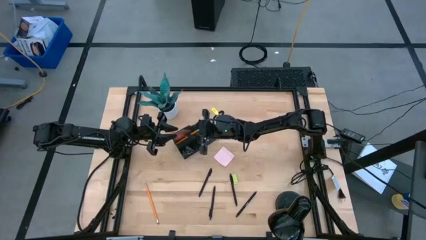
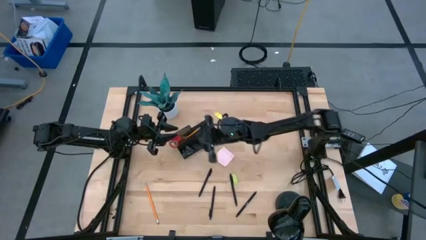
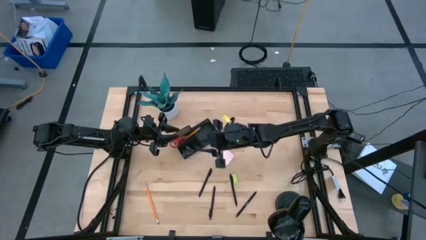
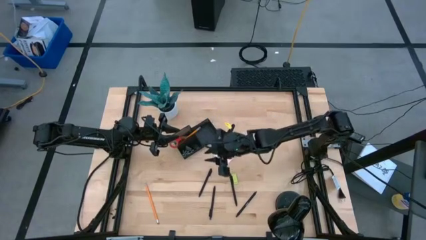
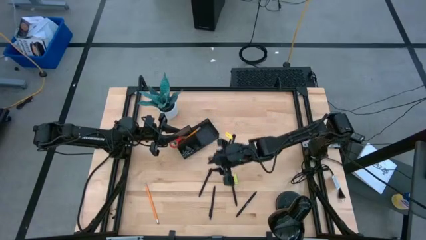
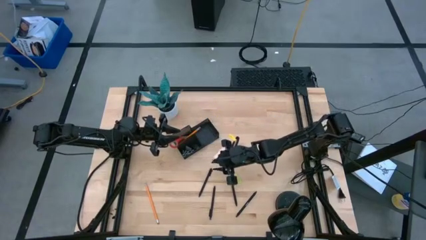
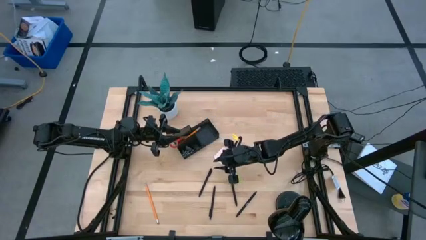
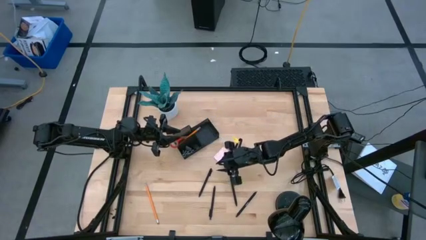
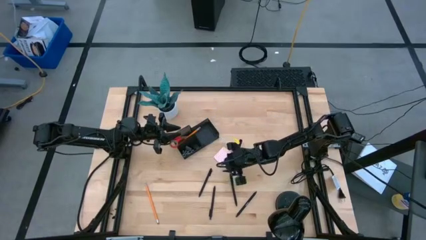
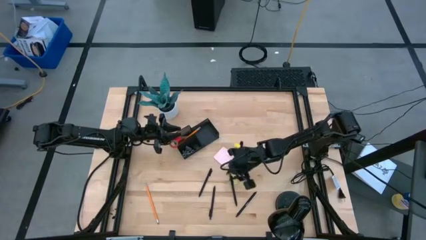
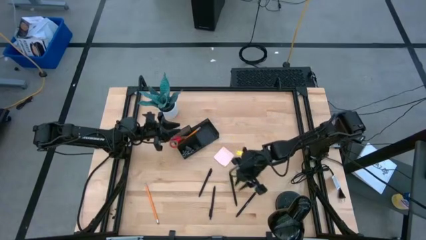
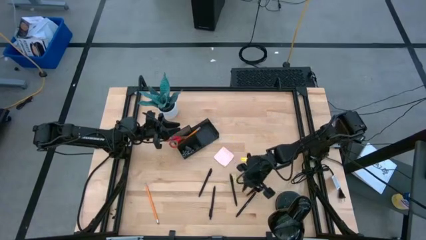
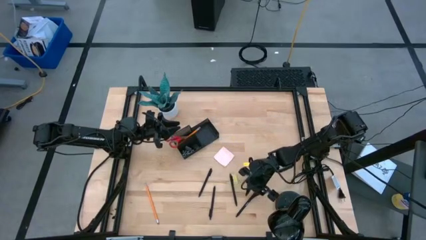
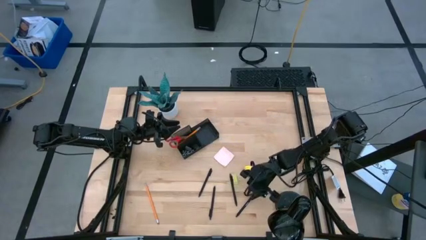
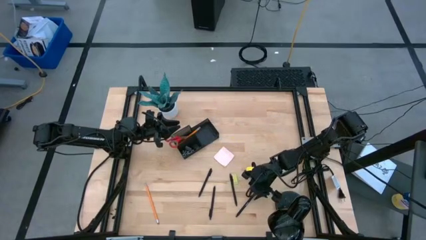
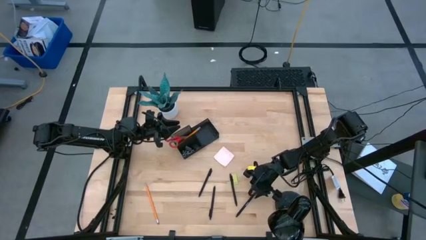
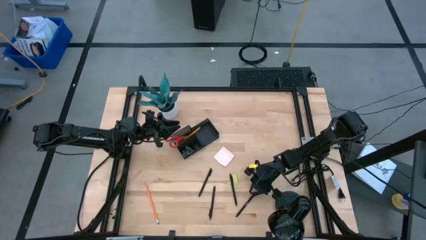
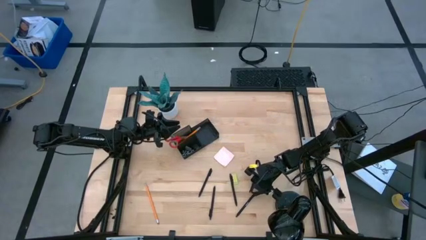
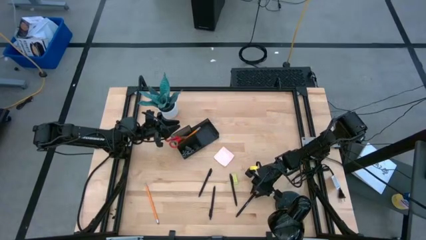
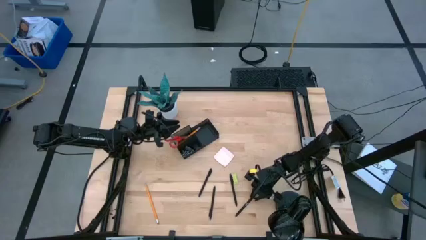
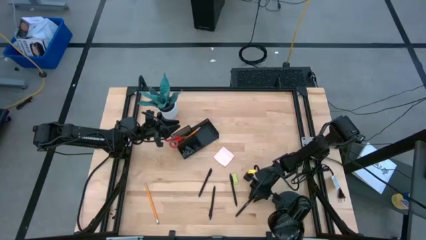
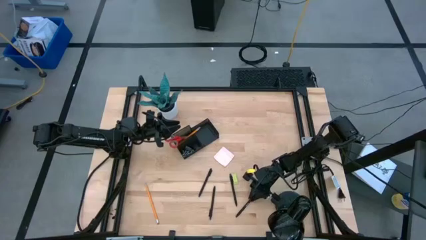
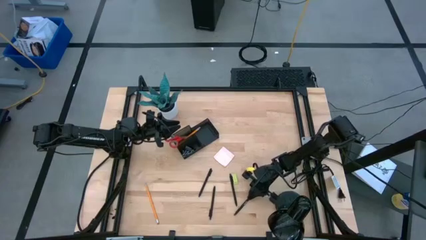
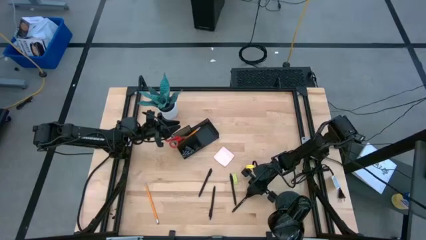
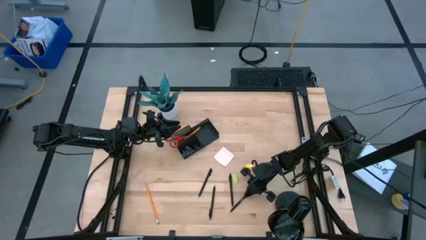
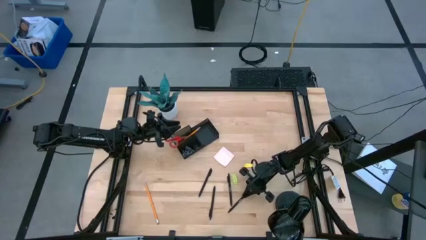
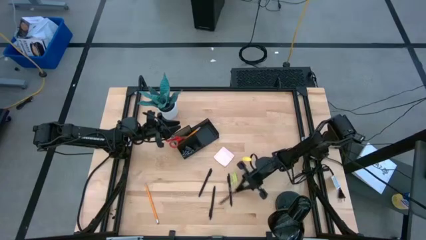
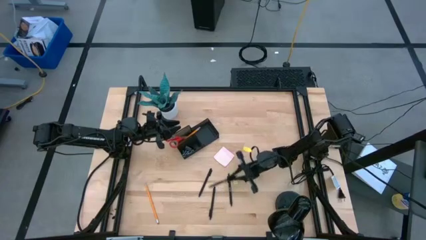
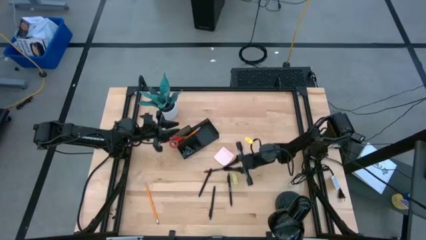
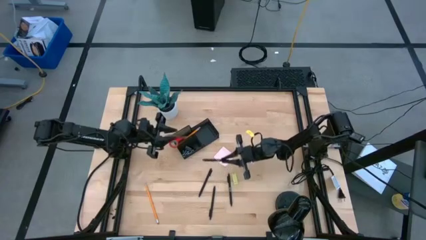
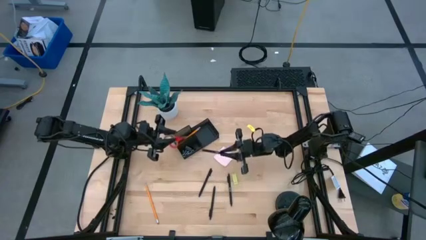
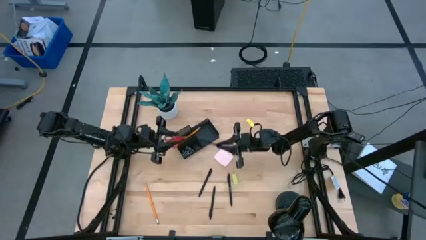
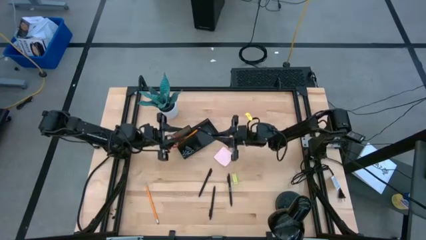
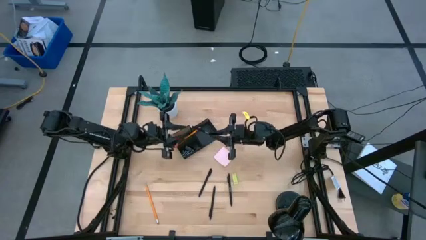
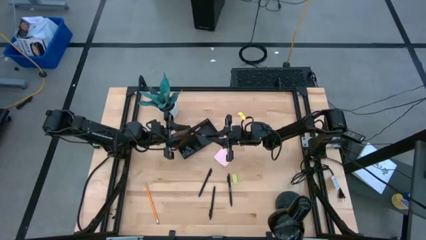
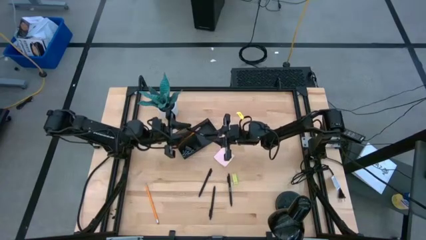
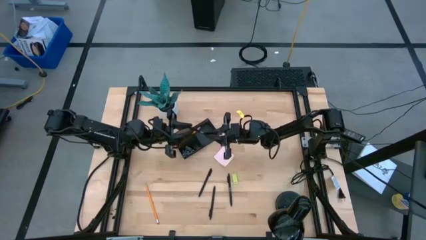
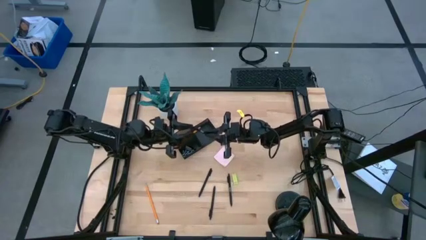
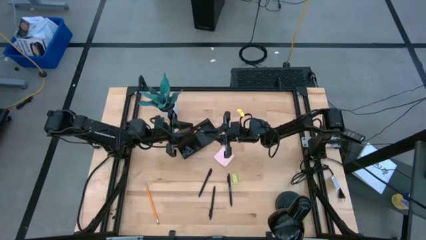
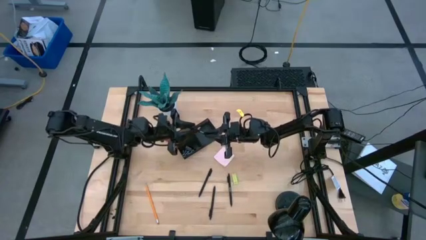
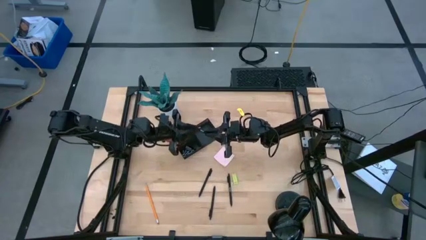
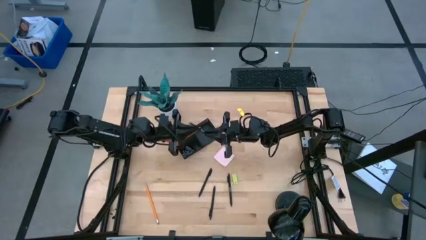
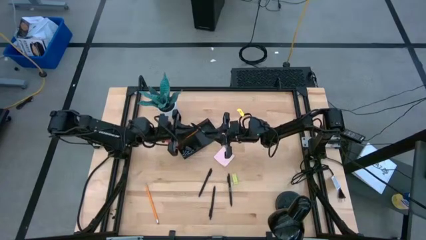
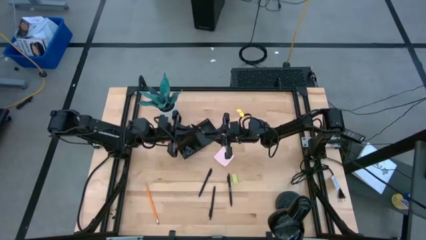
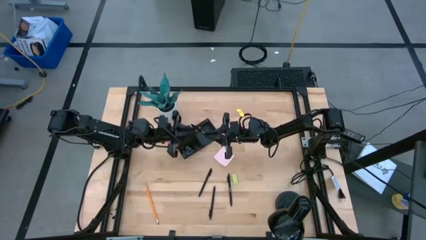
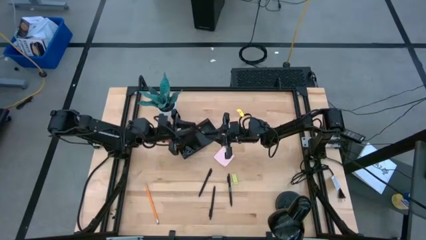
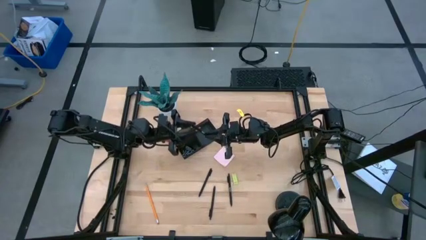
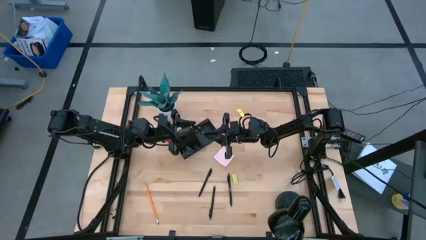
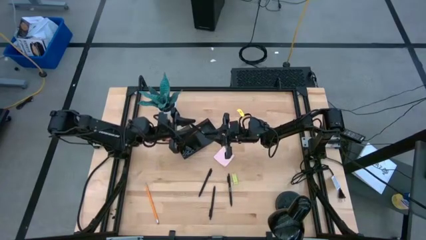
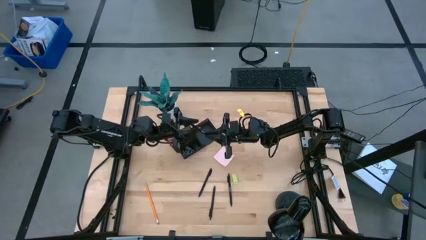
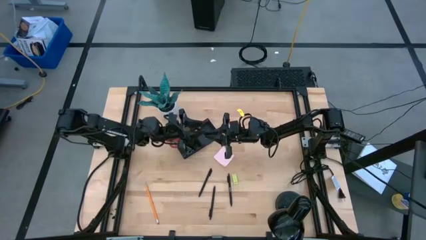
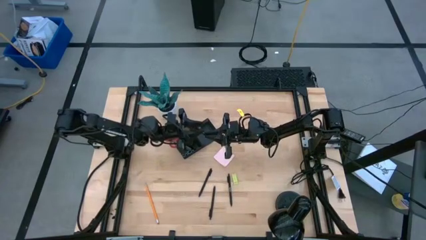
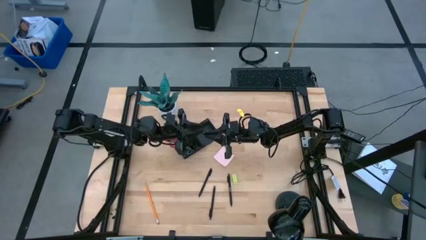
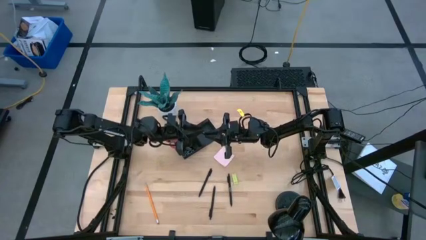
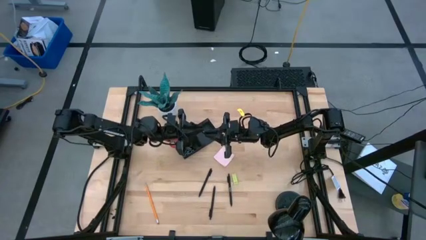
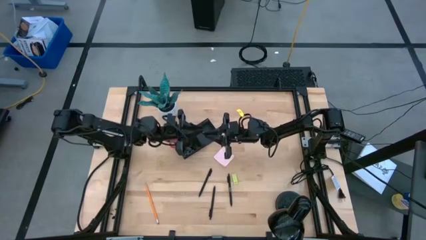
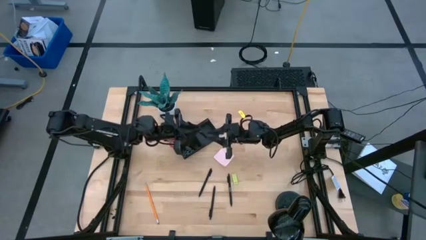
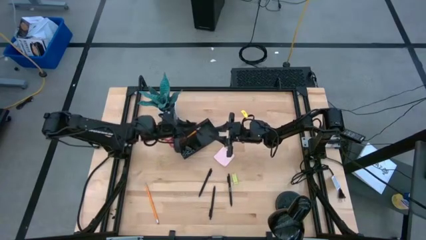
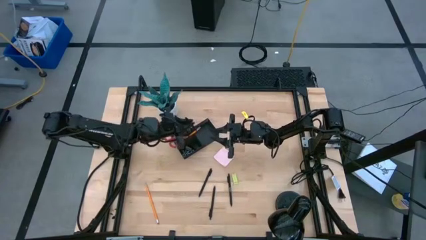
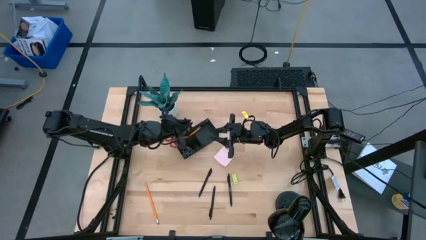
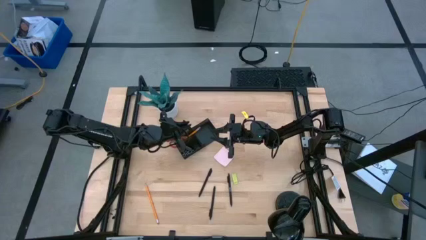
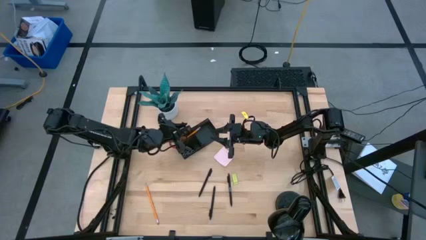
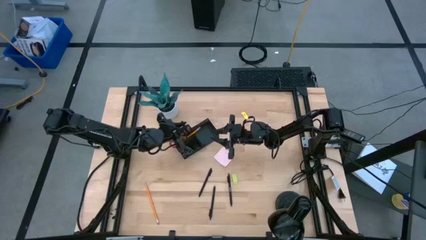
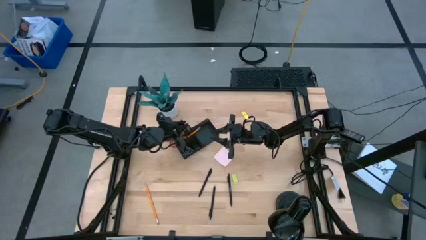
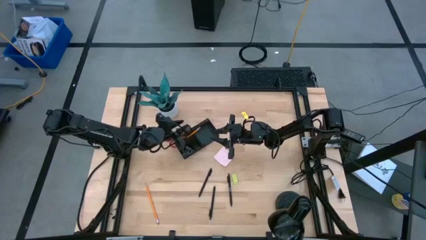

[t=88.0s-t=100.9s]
Task: Pick and place office supplies into organizer
Put the black pen into the black desk organizer

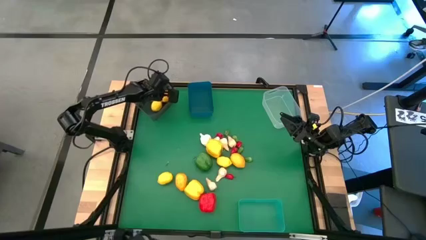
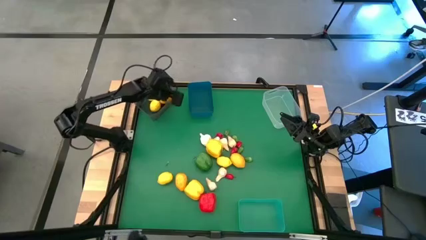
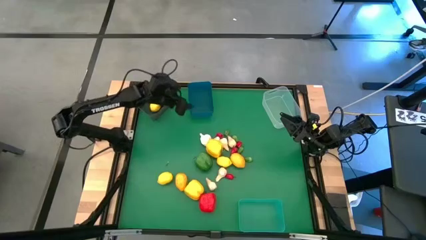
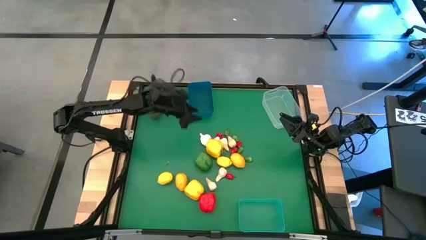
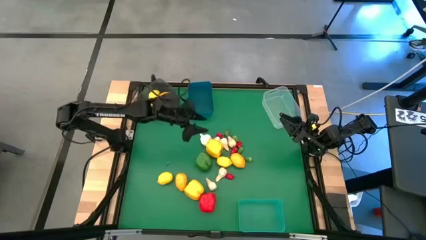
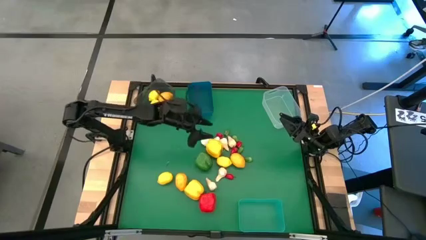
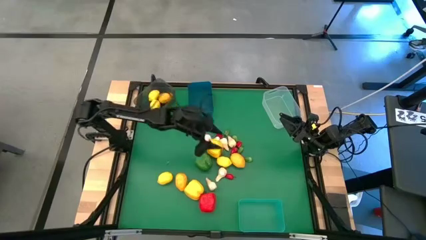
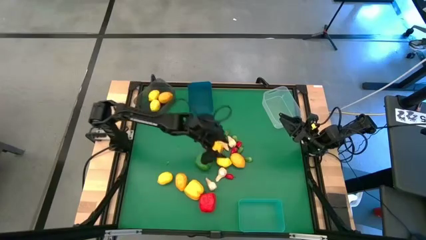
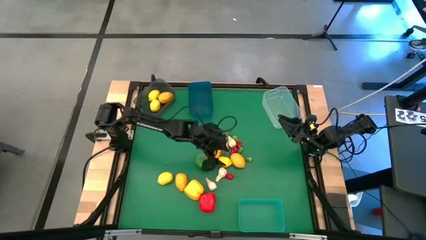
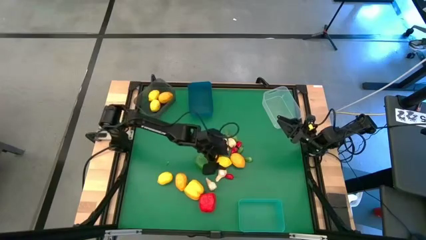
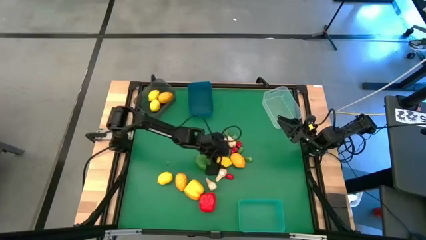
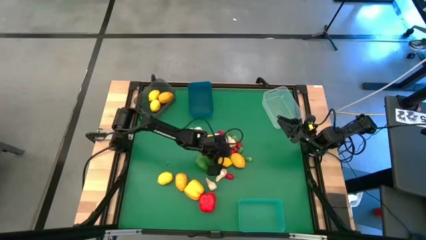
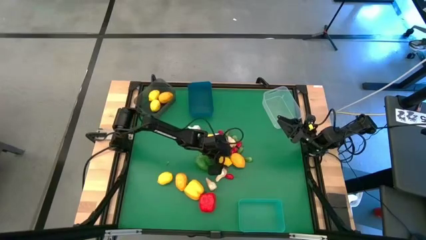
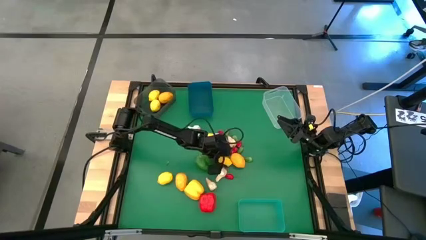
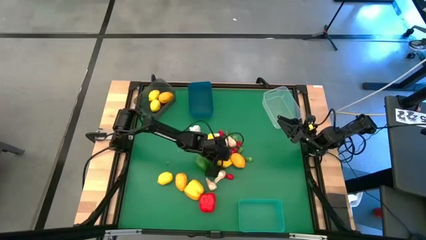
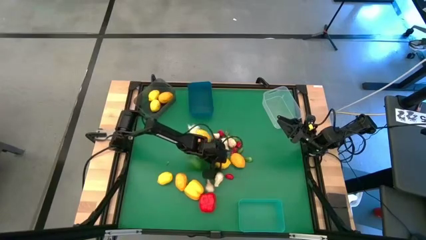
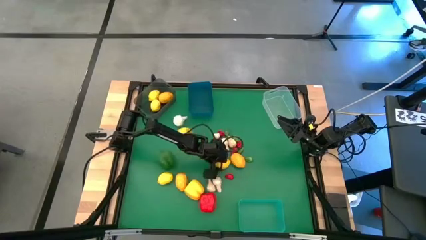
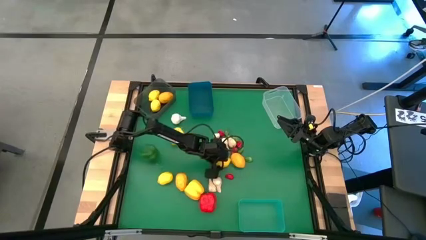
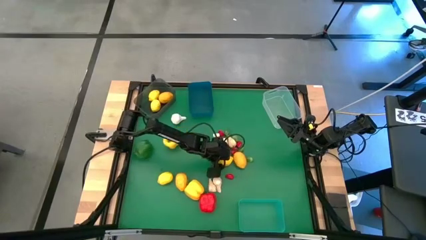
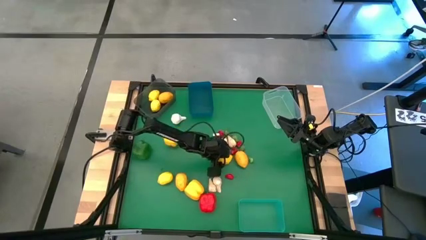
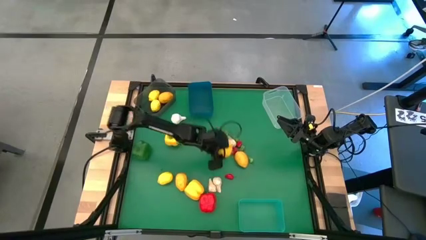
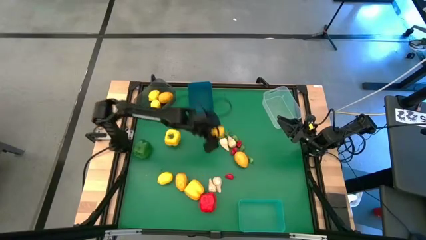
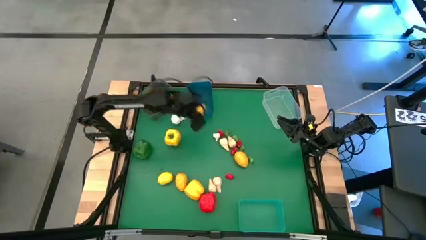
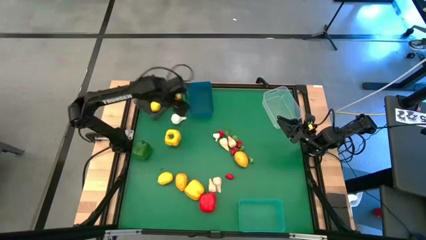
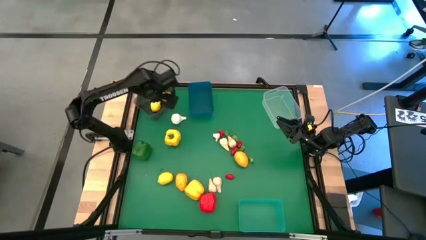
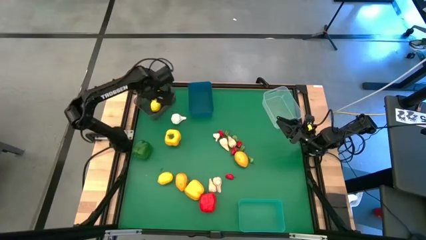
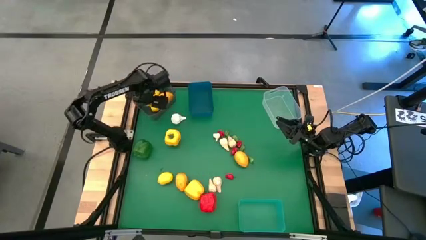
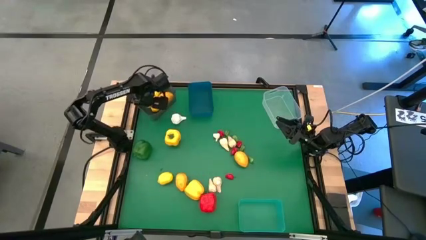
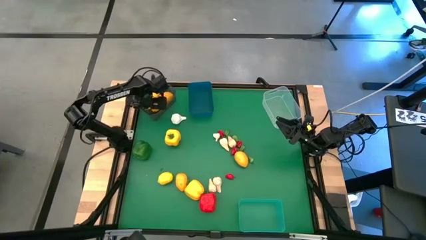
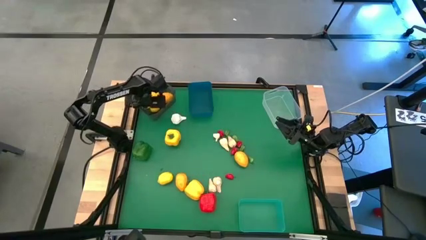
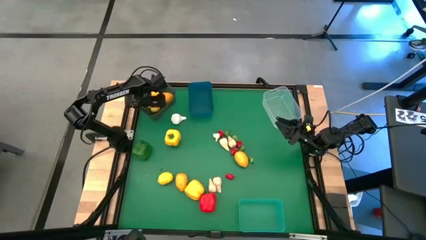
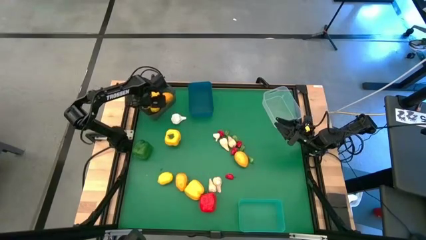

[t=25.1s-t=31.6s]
Task: Sort produce into baskets
Put the right yellow lemon into the black bin
